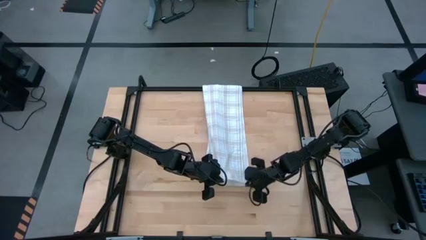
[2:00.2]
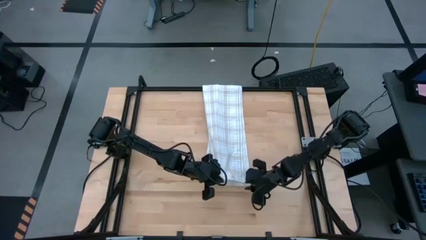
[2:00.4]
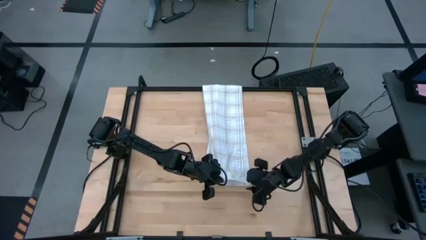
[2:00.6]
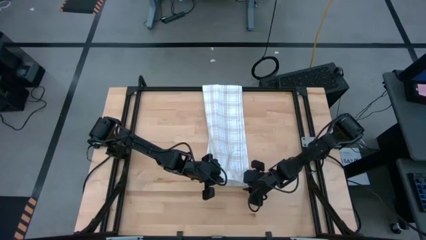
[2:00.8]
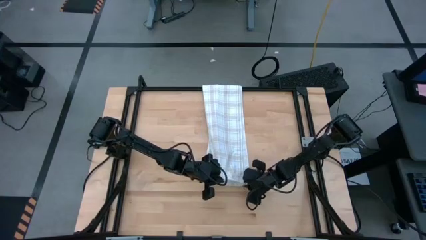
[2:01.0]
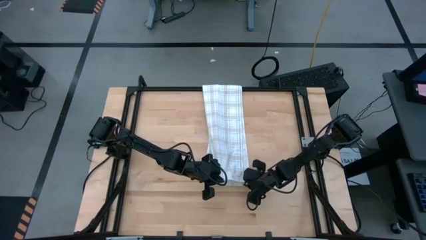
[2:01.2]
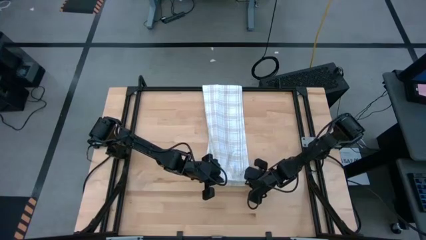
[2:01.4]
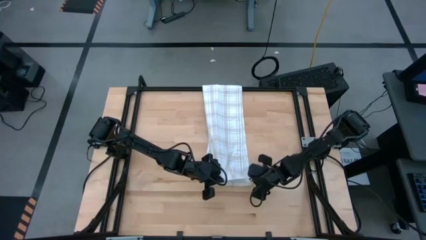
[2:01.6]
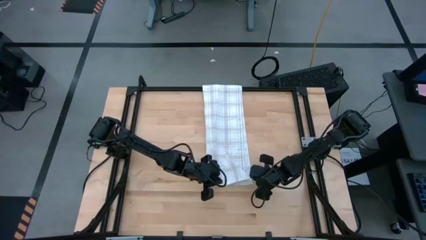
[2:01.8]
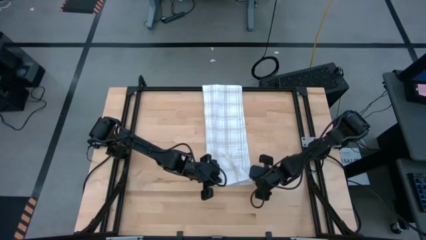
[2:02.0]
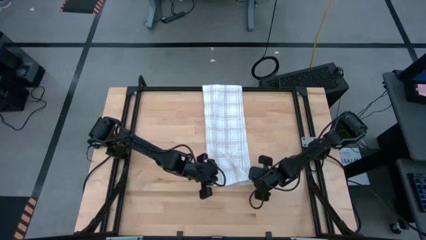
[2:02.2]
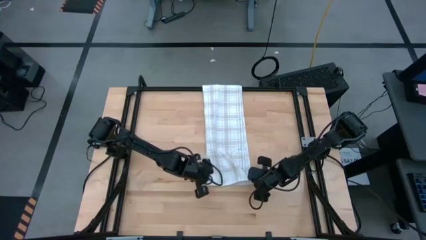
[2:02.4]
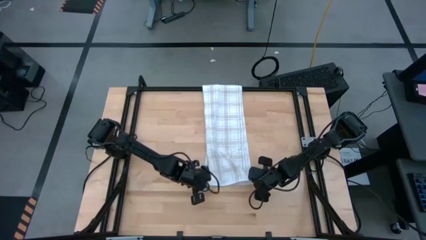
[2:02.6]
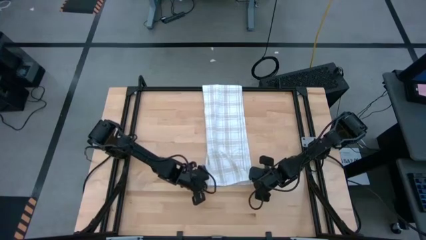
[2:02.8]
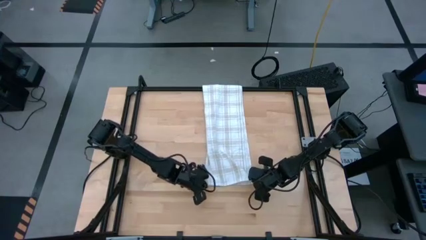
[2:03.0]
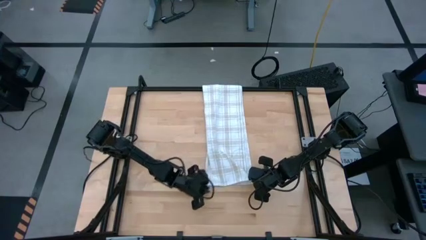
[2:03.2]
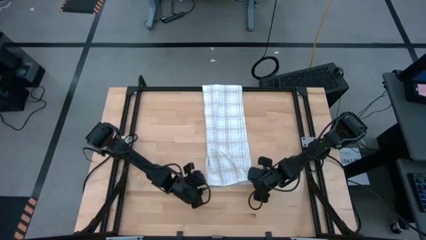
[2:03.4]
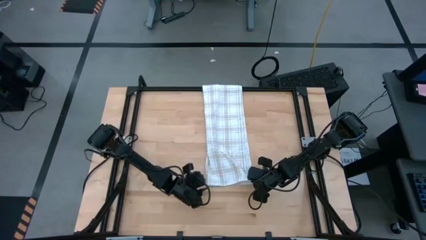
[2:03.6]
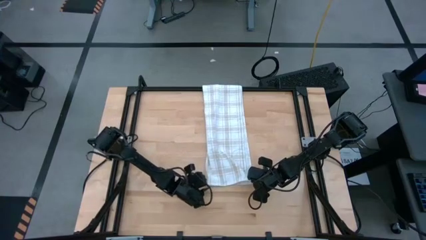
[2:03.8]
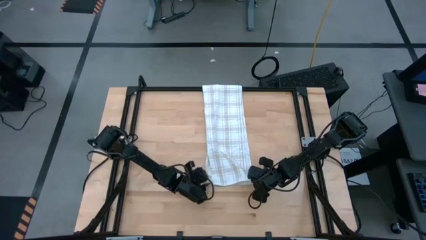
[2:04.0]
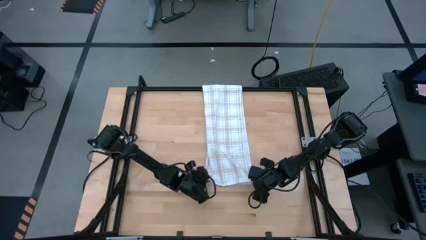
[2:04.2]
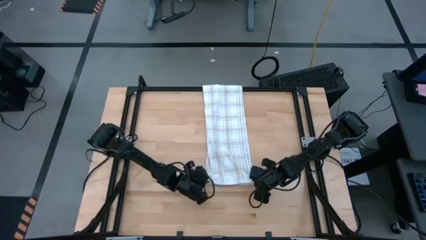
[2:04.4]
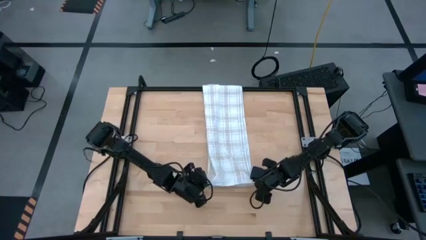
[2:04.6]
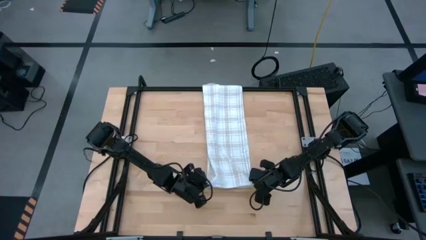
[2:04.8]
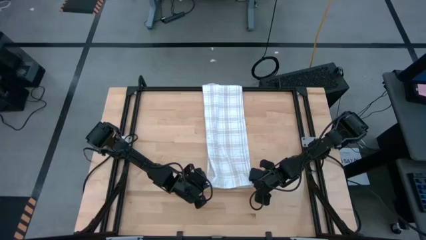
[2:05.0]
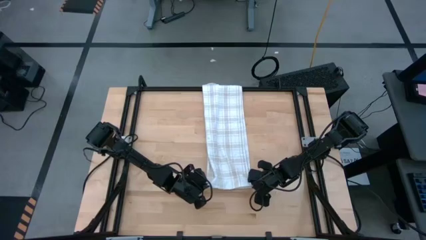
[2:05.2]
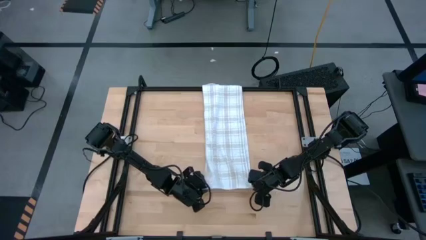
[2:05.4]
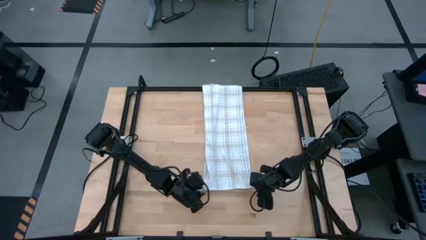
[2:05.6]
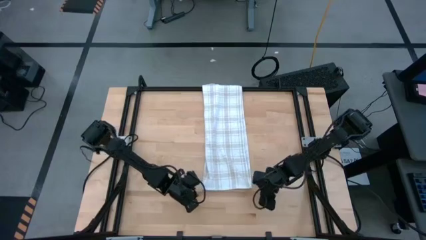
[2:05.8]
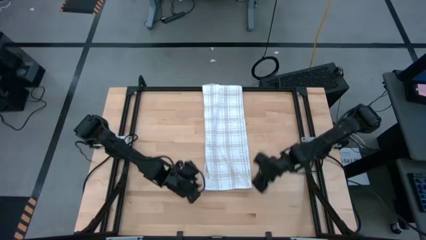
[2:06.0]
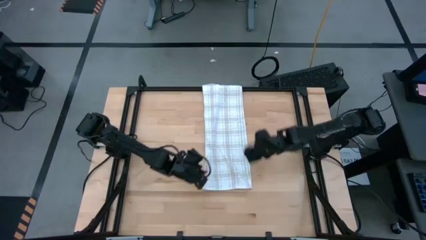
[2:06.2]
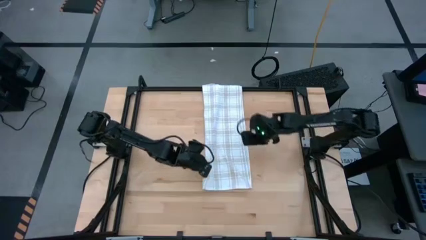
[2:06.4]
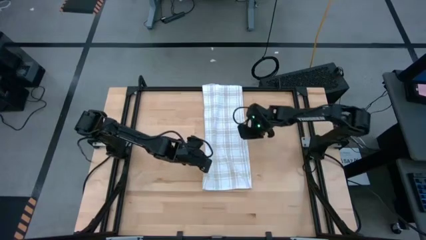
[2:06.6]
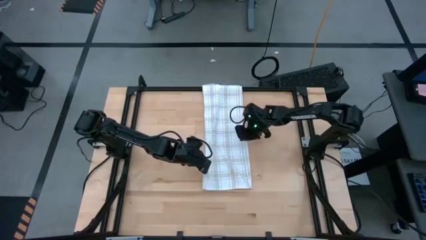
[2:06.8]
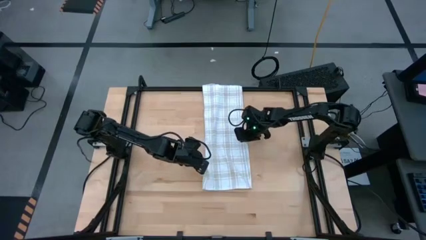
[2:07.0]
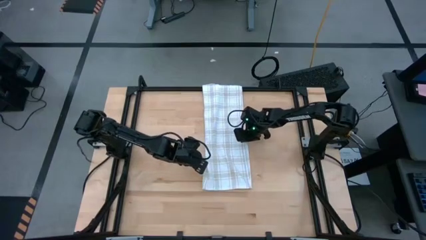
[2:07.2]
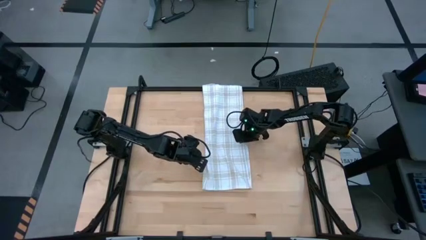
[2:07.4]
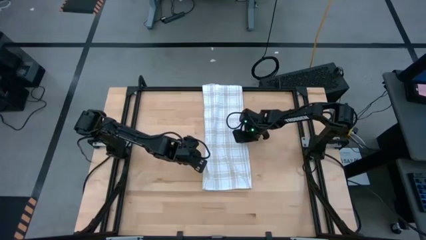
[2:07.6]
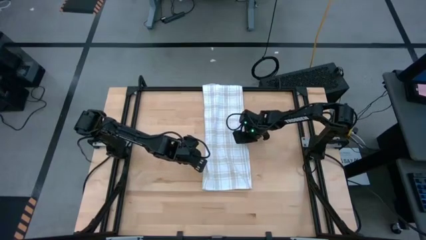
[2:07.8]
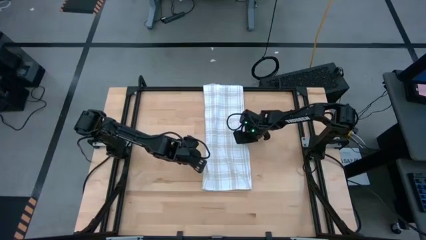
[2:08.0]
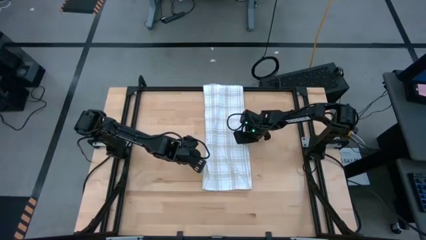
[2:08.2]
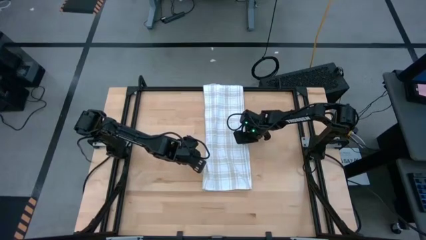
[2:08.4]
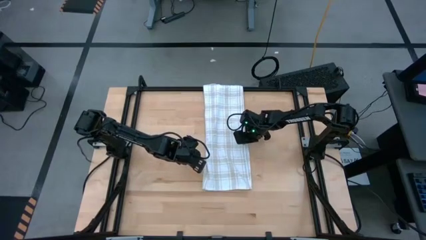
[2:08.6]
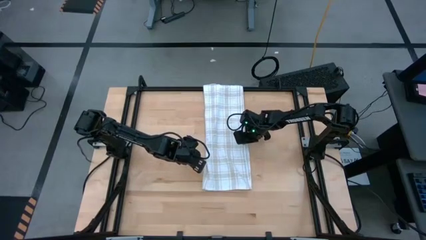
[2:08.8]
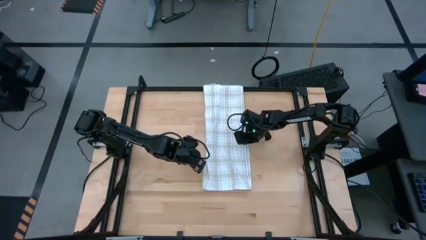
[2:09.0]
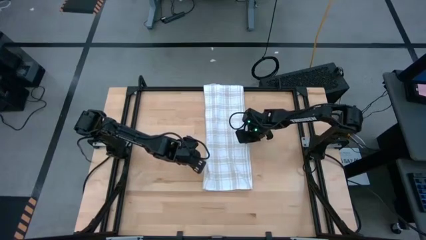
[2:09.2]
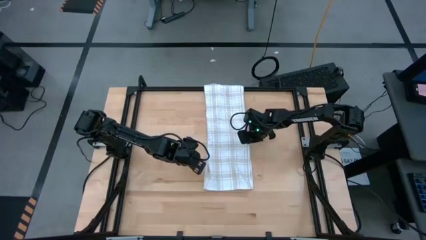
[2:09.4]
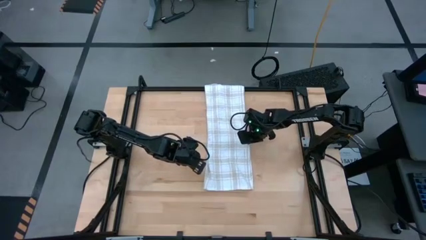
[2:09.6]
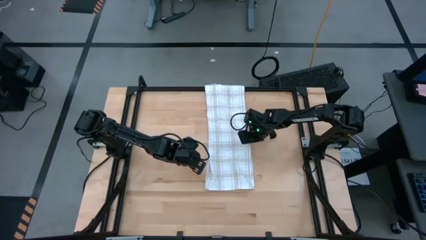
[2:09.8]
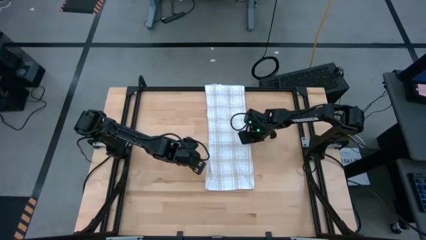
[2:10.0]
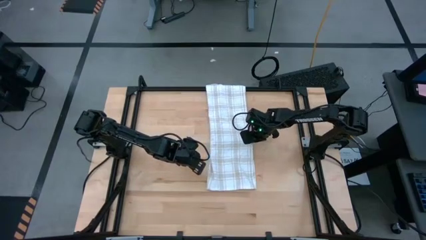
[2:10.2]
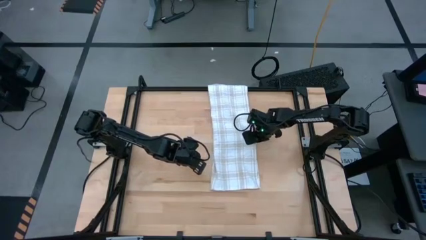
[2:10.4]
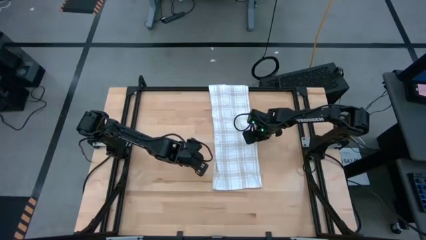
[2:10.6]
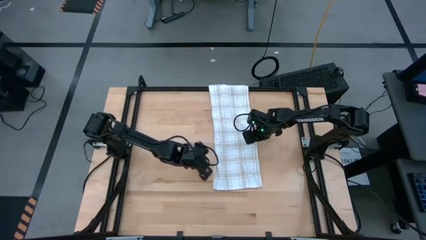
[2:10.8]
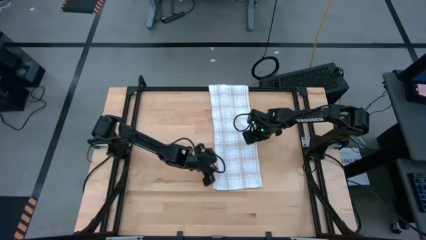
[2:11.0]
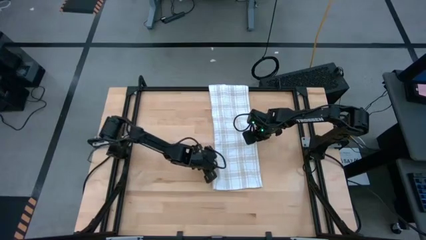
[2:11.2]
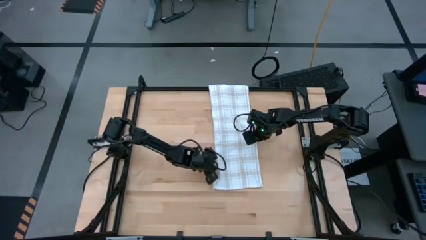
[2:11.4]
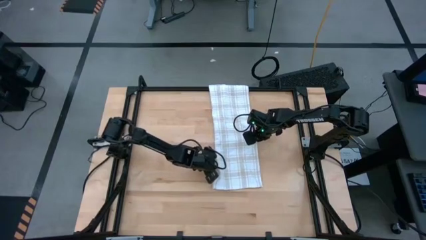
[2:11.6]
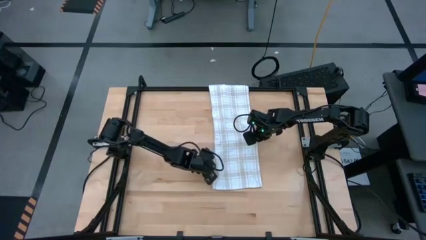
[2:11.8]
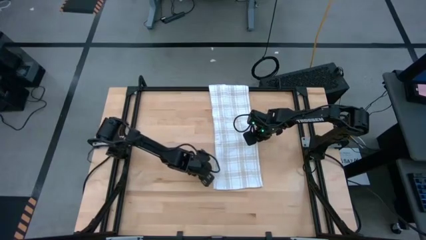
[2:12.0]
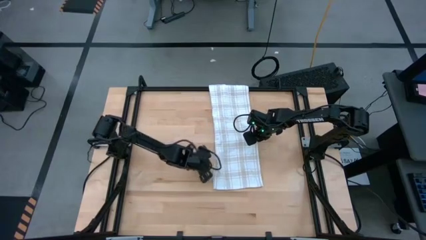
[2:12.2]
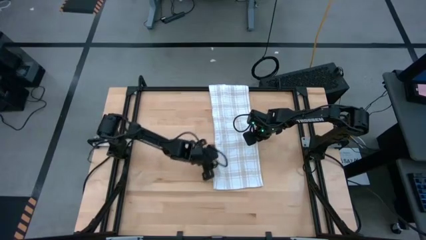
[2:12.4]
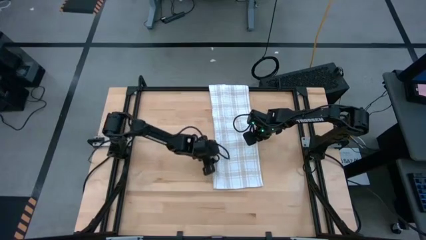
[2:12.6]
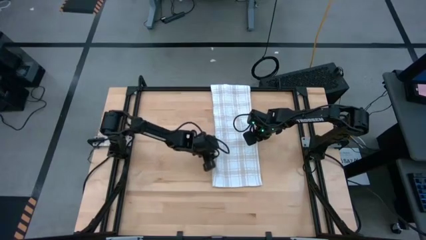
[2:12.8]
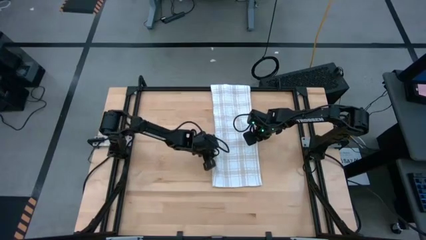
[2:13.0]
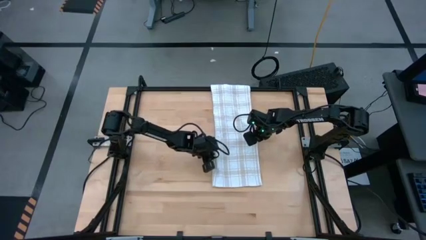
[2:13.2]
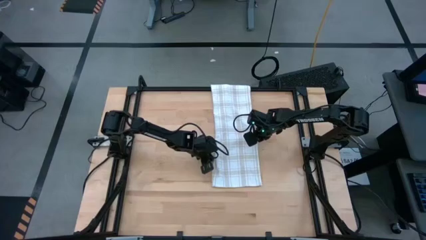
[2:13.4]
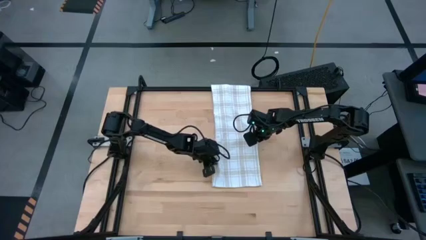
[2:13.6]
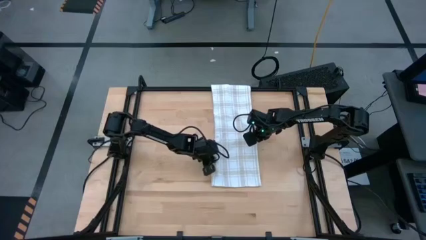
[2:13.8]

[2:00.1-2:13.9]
Task: Roll towel into tight, uniform cylinder
Roll the white towel
